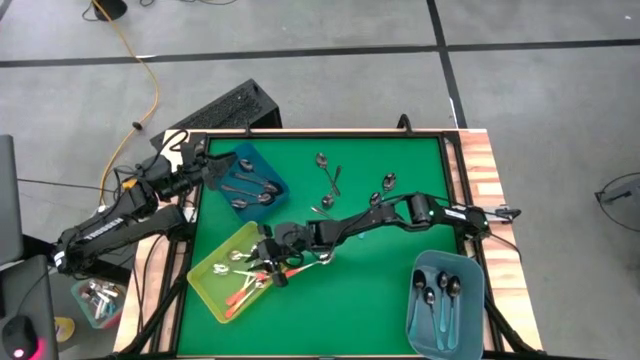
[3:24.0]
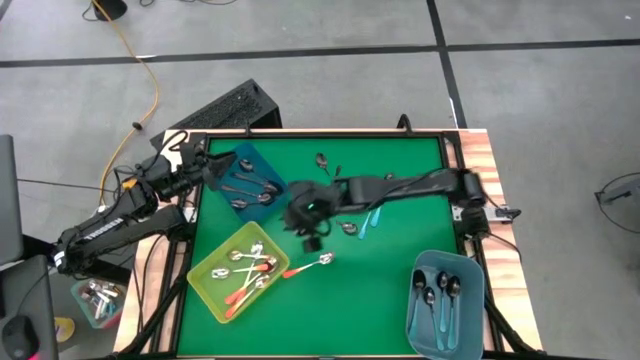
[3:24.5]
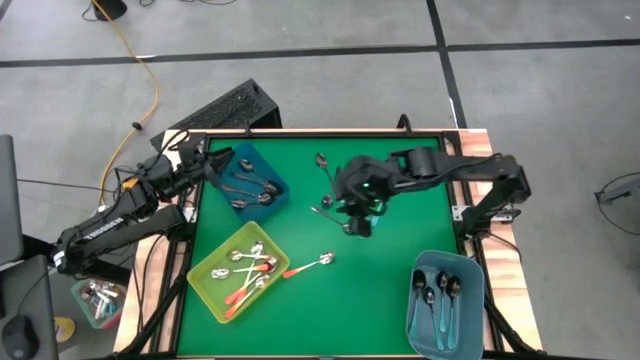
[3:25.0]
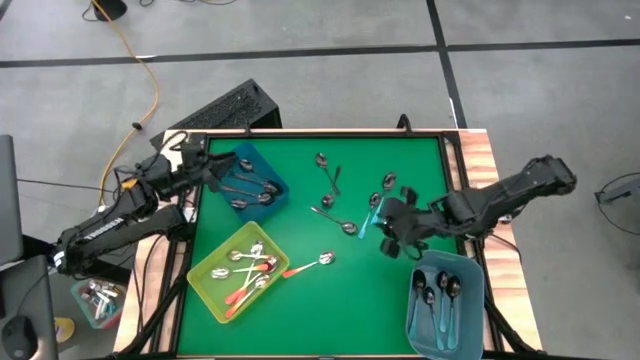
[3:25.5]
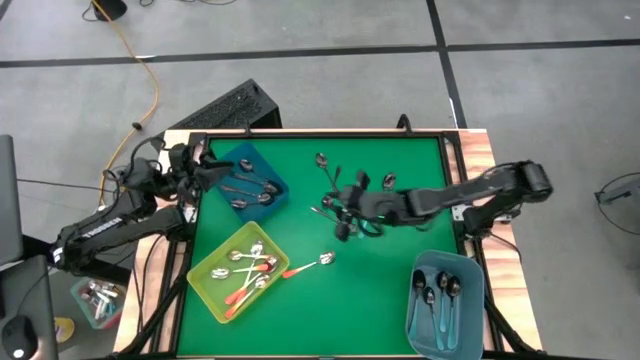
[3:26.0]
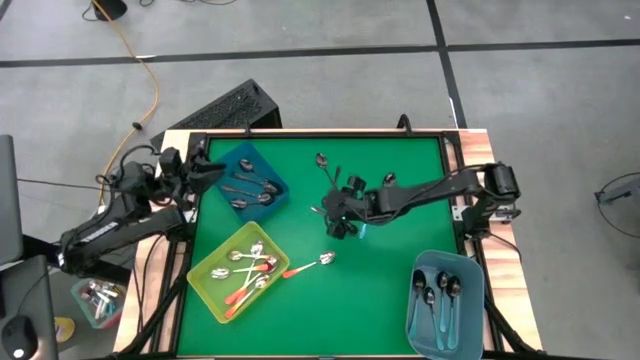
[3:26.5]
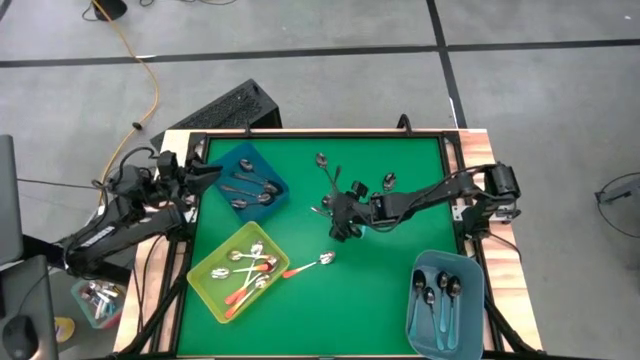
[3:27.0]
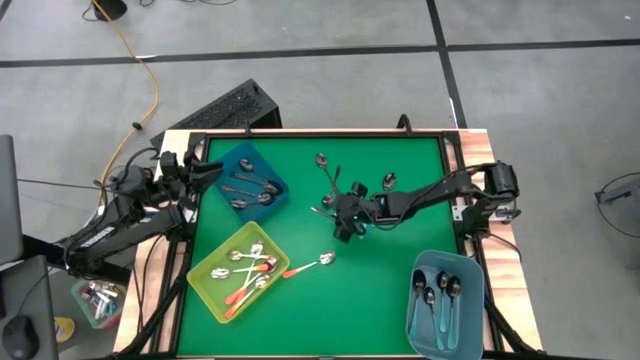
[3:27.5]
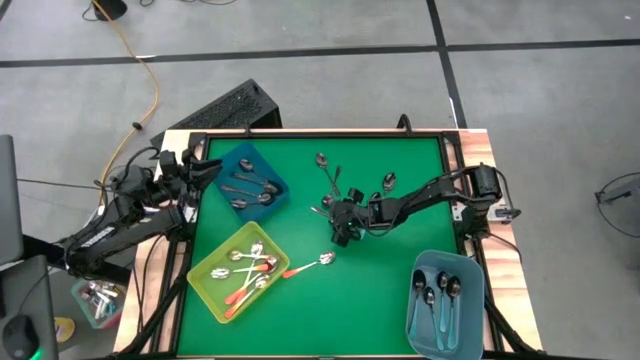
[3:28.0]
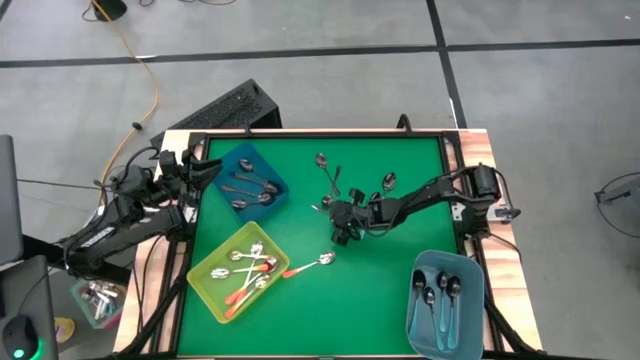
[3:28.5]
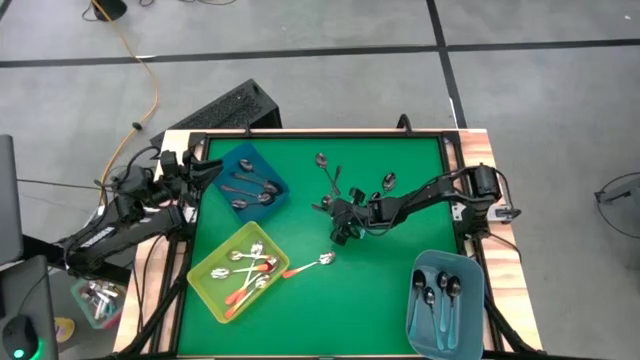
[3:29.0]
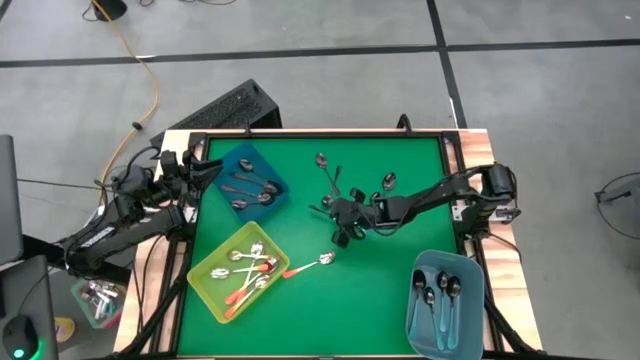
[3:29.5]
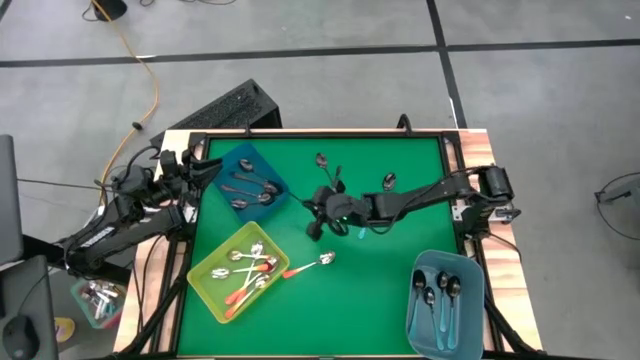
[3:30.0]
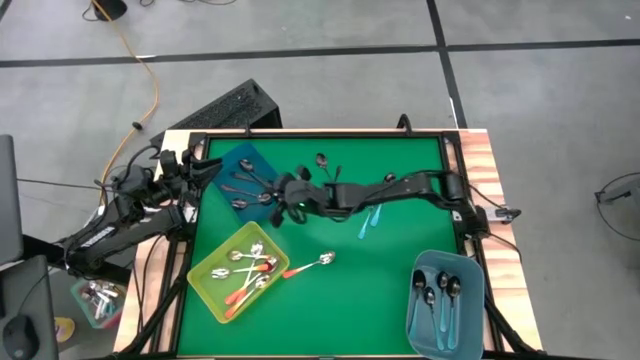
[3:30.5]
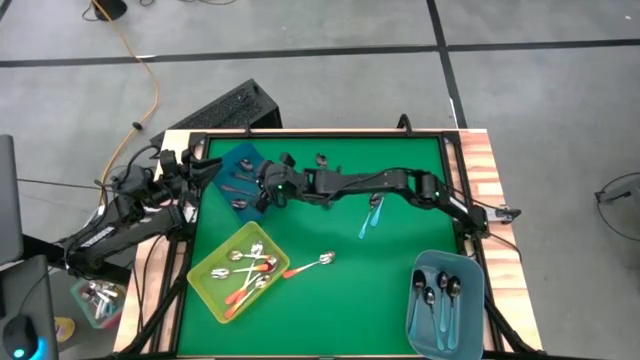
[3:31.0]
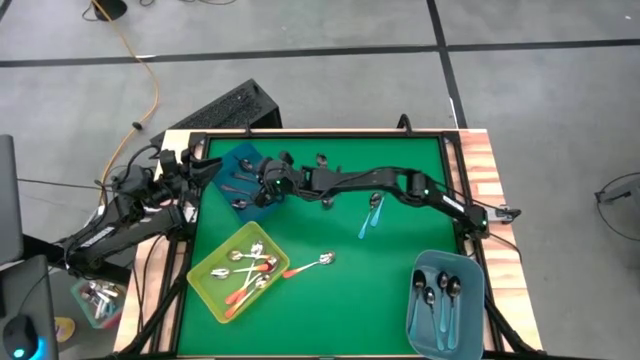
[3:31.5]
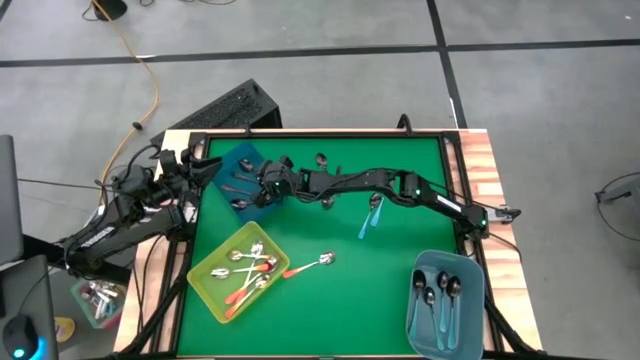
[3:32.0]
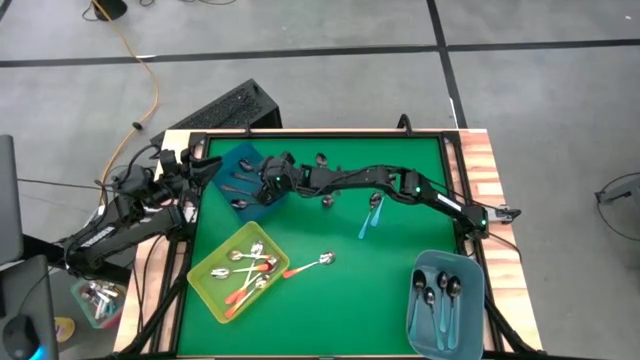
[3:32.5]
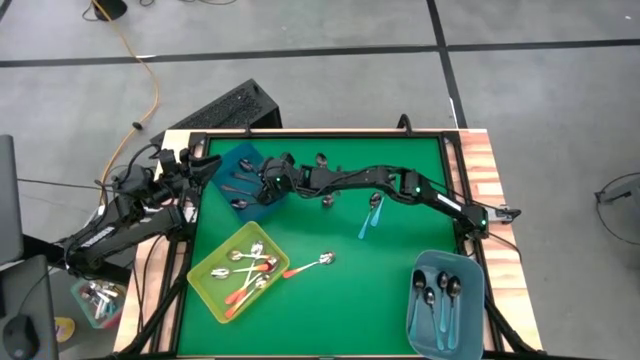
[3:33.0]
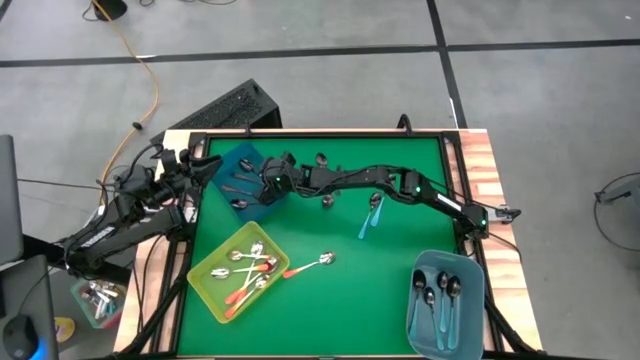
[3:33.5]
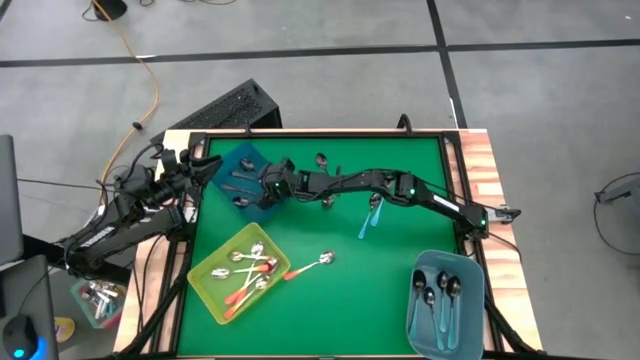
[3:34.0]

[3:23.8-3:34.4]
Task: Sort silverware by color (type)
Put the black spoon into the dark blue bin

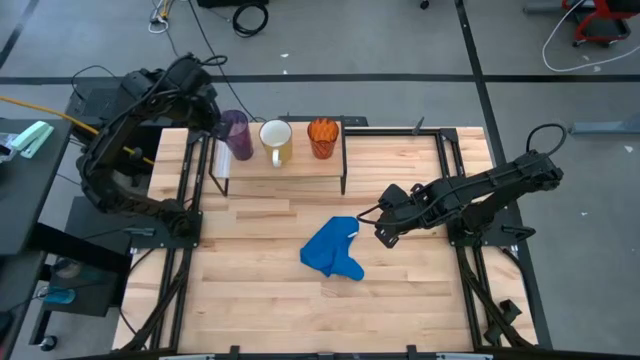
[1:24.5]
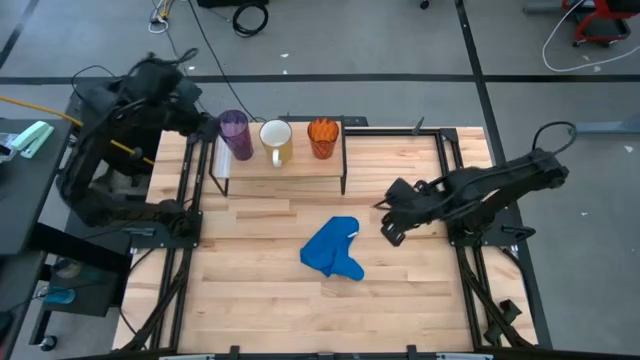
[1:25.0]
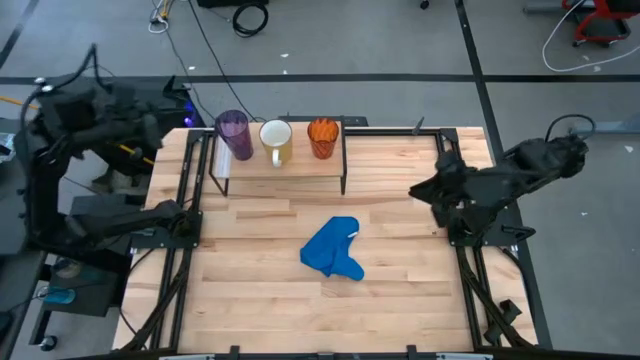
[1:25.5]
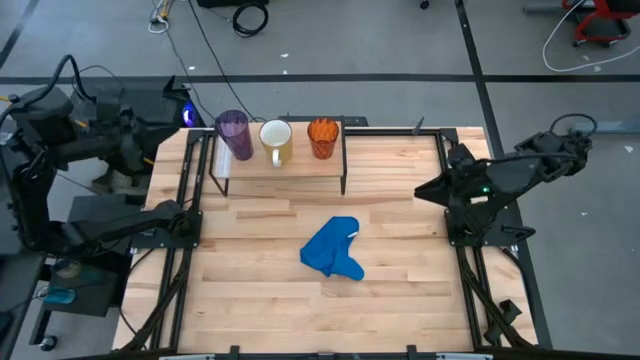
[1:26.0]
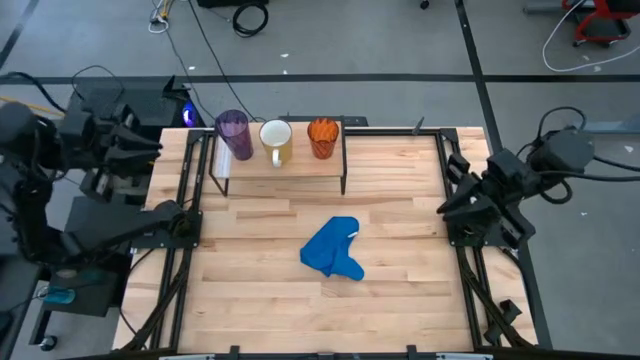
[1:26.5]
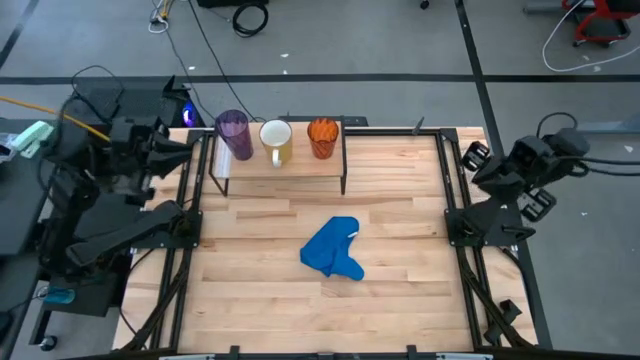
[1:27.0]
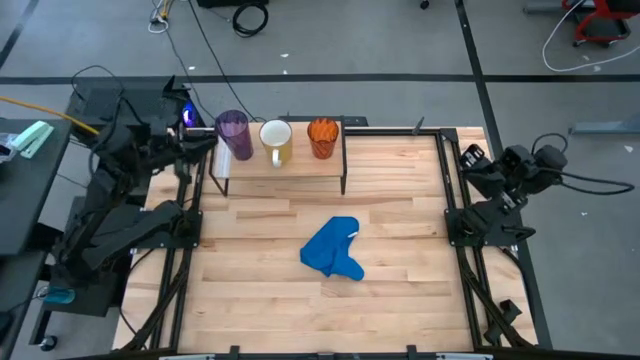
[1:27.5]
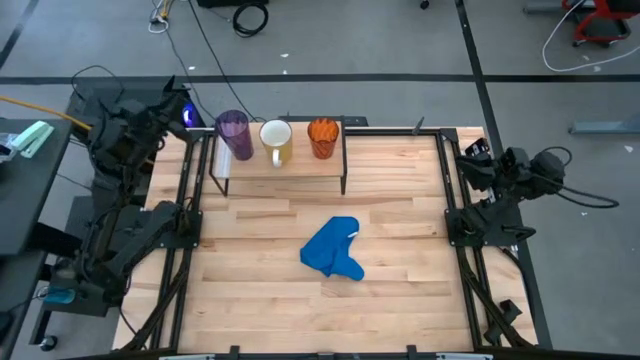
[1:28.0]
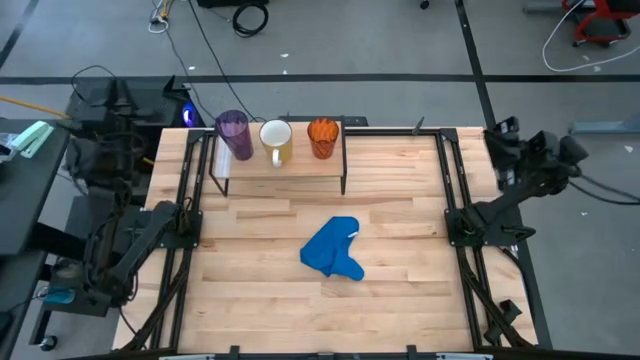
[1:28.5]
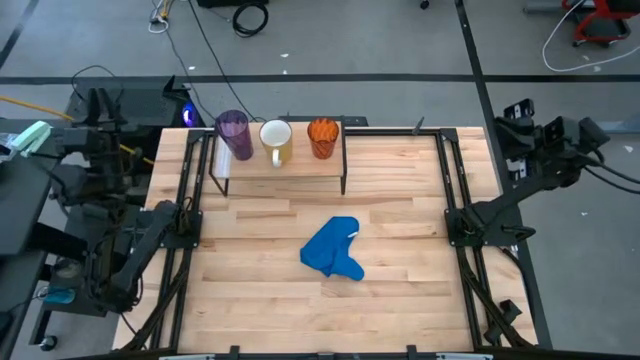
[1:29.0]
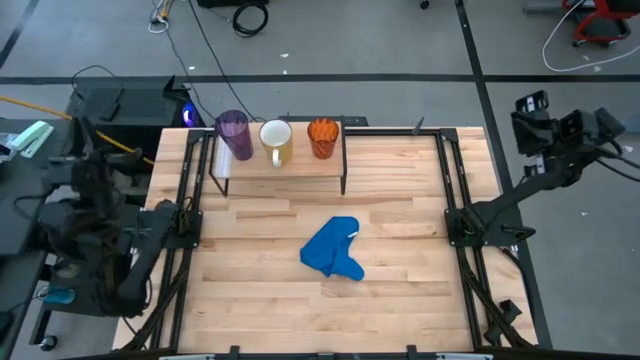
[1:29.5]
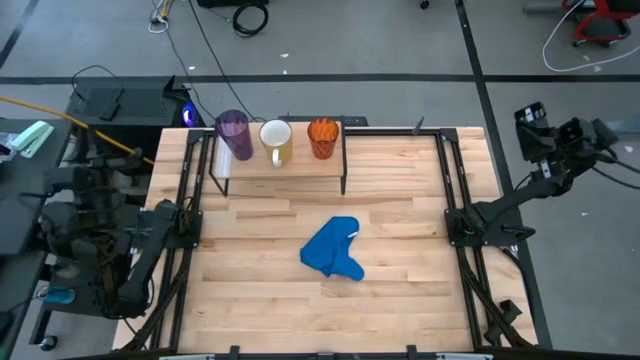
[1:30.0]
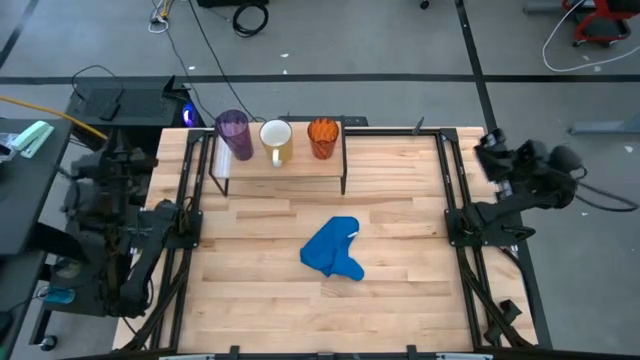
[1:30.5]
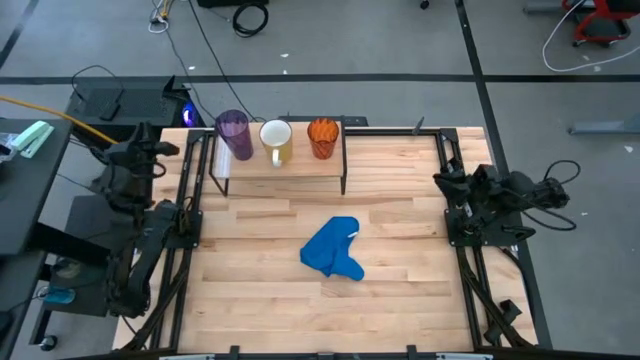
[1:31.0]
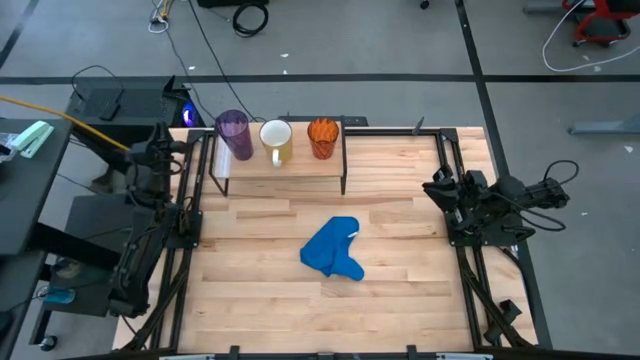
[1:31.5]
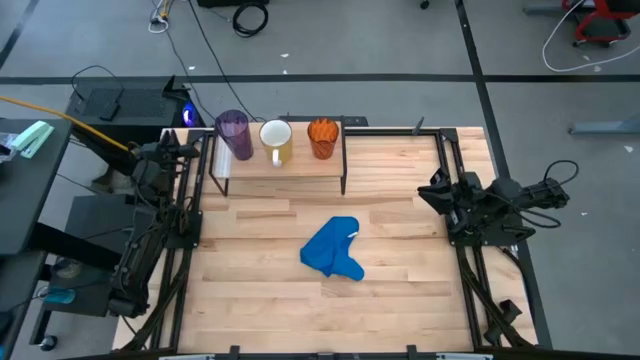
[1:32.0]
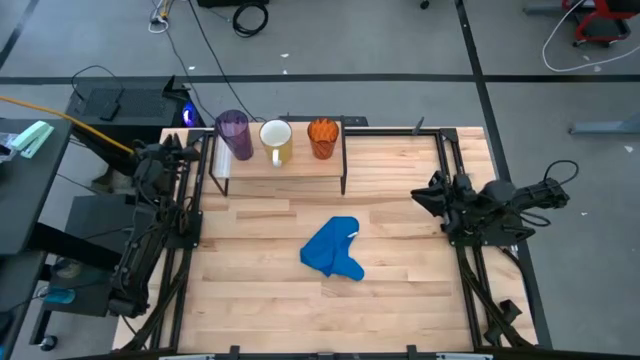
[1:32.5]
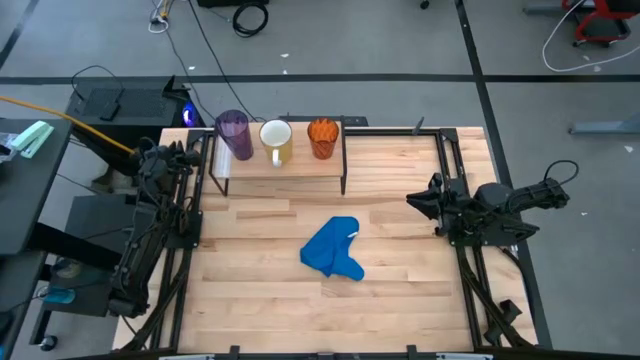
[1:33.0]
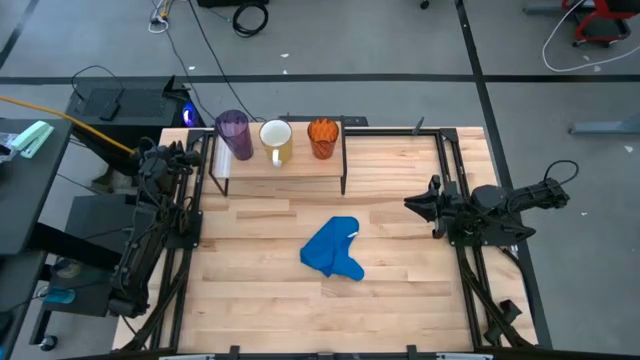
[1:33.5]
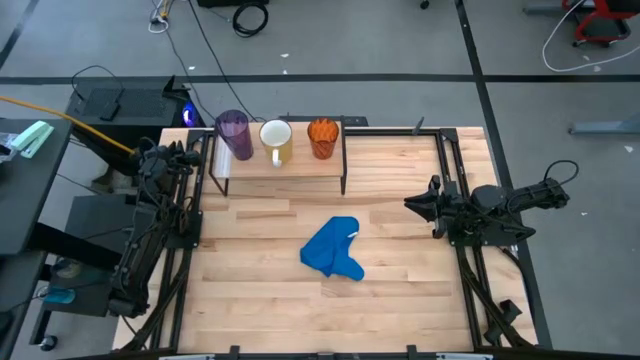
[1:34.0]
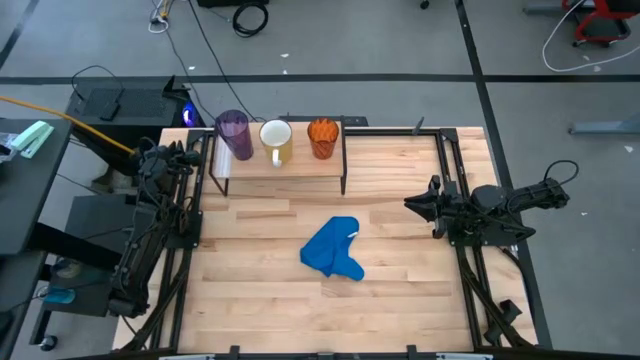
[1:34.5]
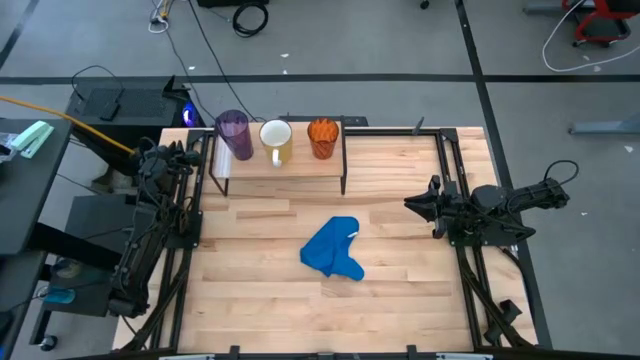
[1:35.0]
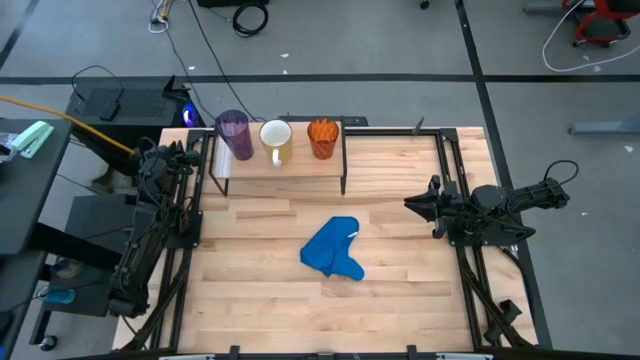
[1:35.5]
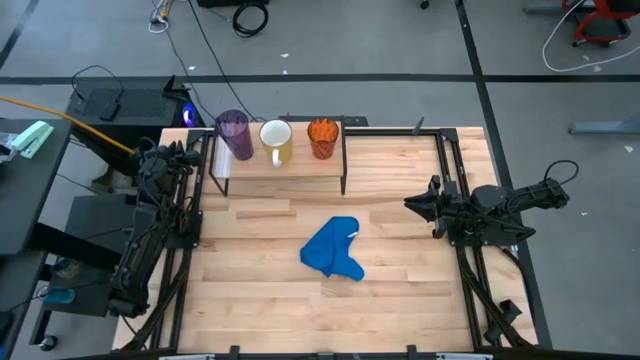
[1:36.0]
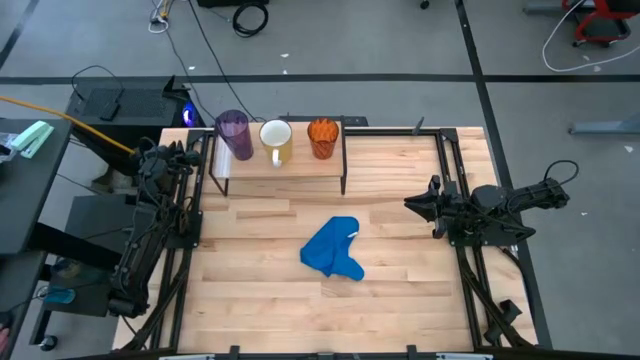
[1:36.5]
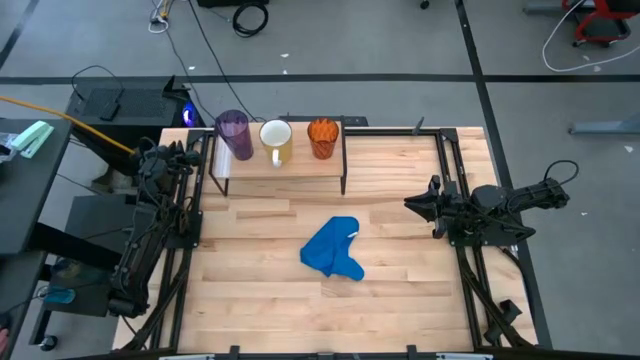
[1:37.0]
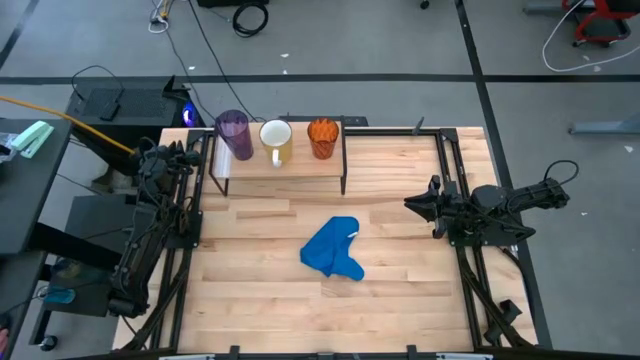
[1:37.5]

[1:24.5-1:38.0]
Task: Stack small to large cups/mugs on shelf
Return to Home Position
